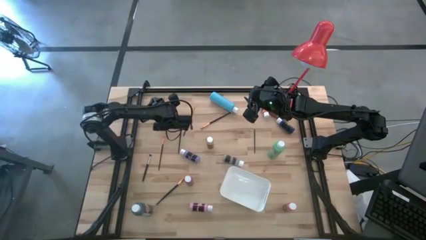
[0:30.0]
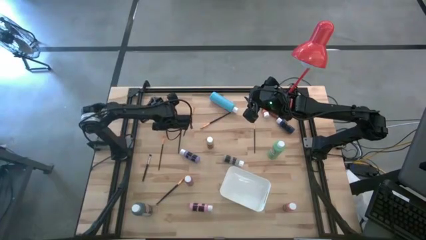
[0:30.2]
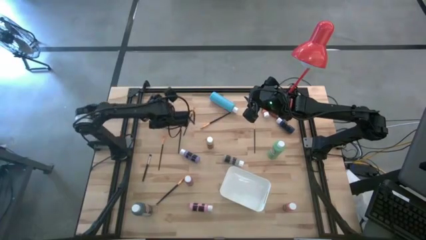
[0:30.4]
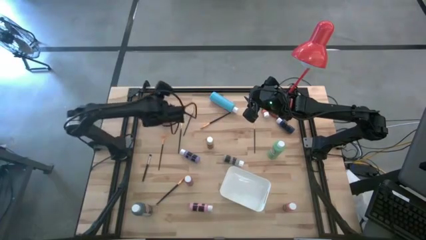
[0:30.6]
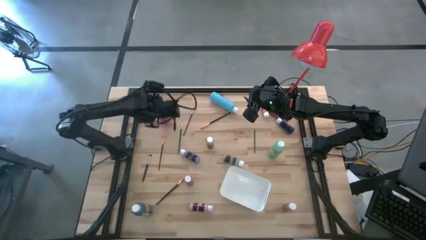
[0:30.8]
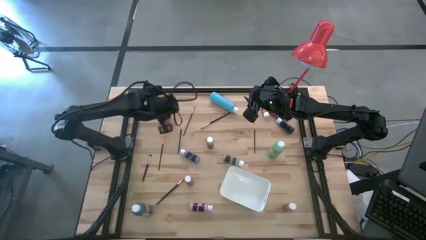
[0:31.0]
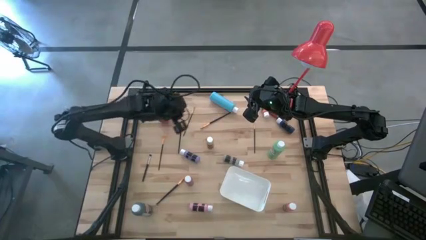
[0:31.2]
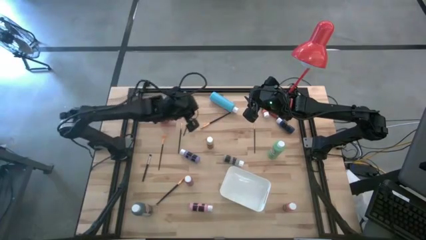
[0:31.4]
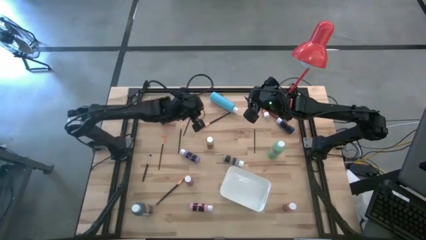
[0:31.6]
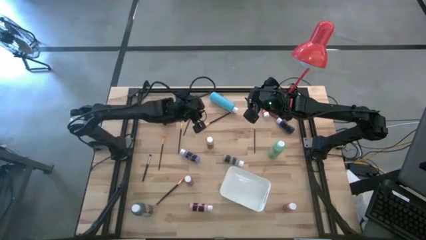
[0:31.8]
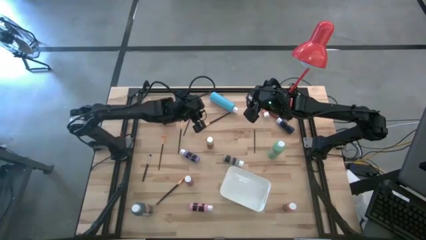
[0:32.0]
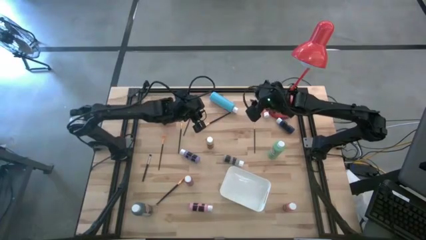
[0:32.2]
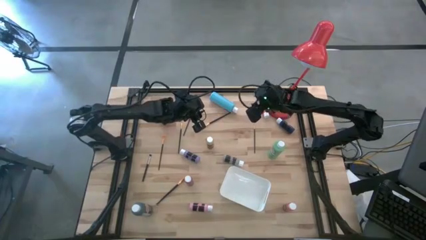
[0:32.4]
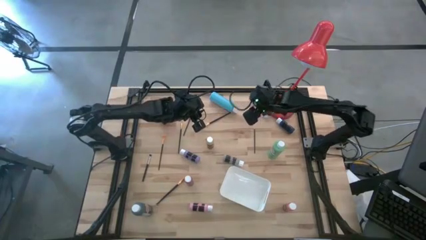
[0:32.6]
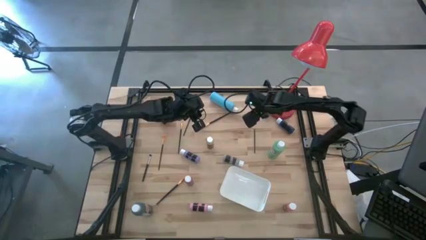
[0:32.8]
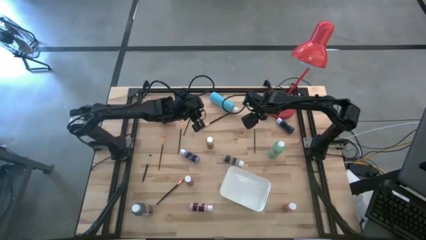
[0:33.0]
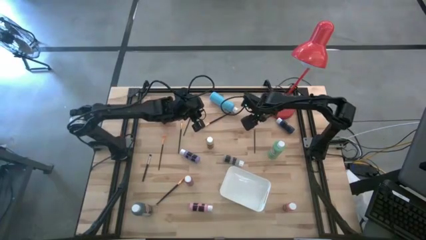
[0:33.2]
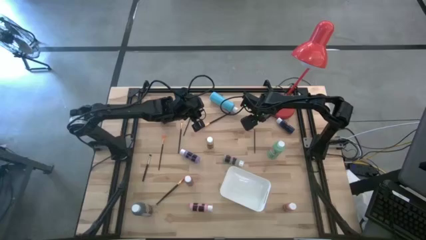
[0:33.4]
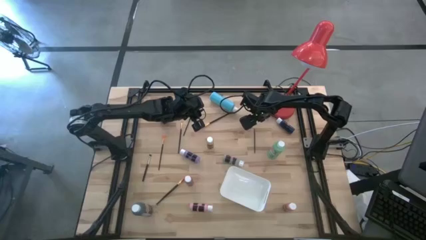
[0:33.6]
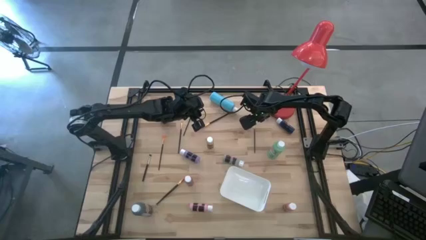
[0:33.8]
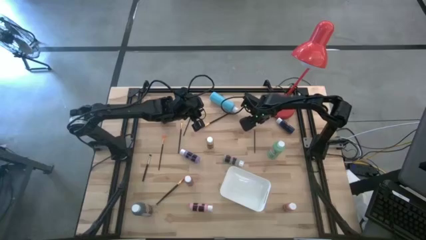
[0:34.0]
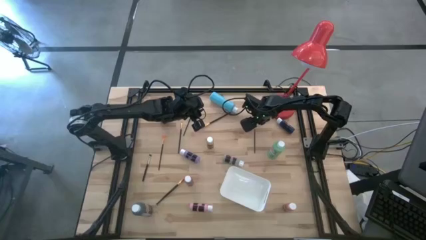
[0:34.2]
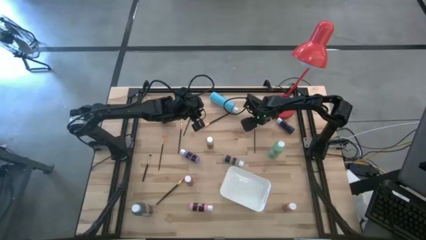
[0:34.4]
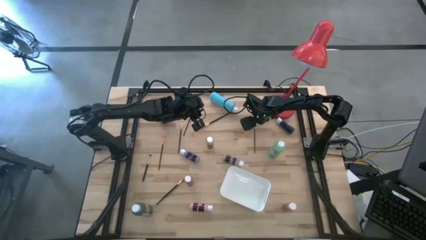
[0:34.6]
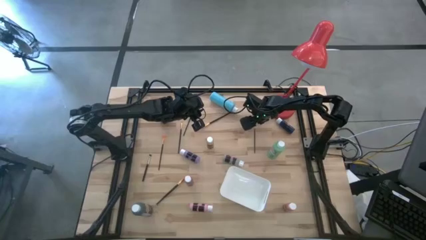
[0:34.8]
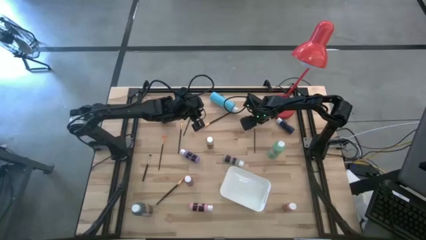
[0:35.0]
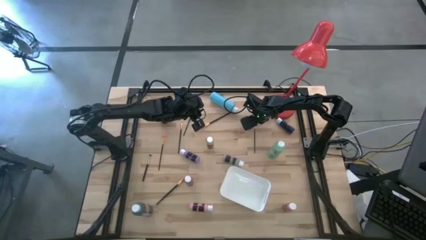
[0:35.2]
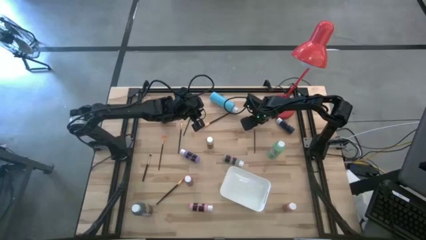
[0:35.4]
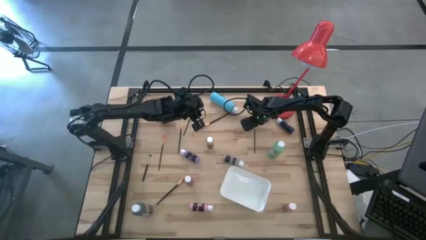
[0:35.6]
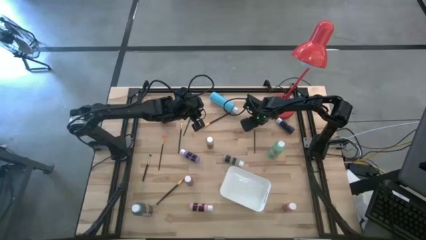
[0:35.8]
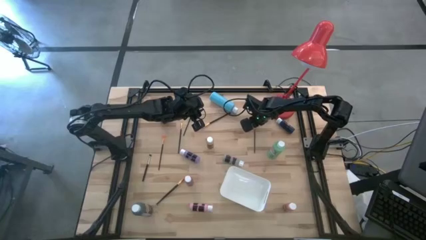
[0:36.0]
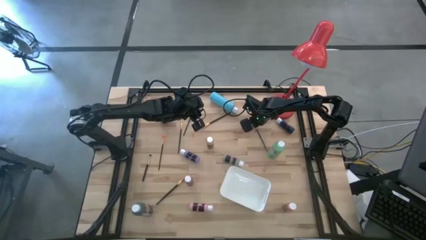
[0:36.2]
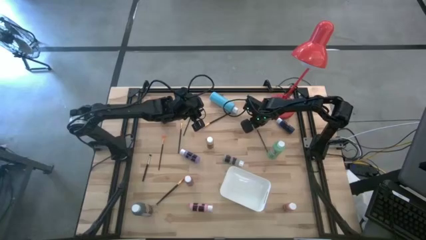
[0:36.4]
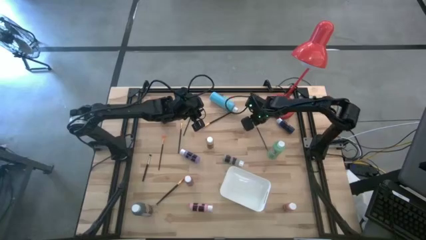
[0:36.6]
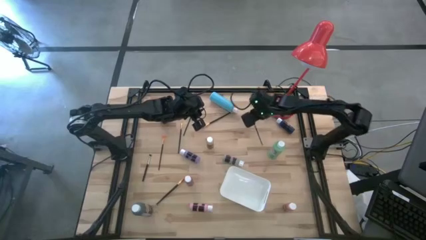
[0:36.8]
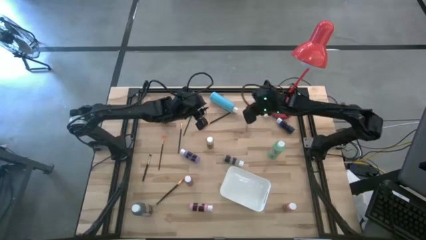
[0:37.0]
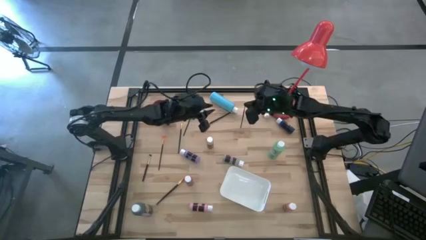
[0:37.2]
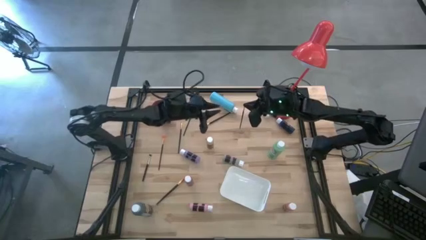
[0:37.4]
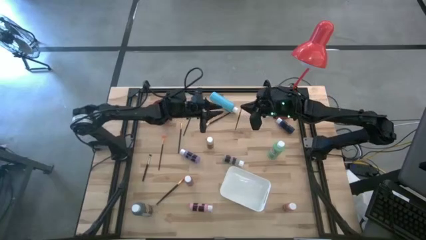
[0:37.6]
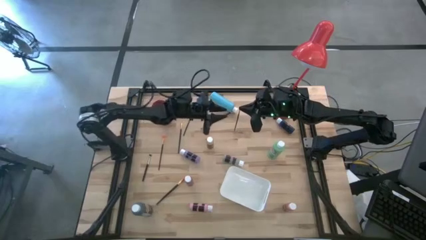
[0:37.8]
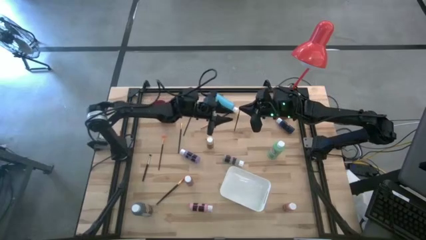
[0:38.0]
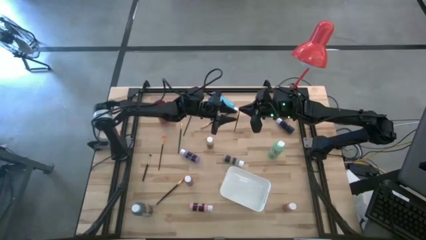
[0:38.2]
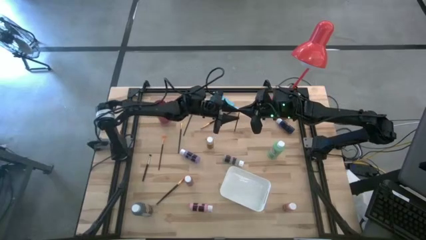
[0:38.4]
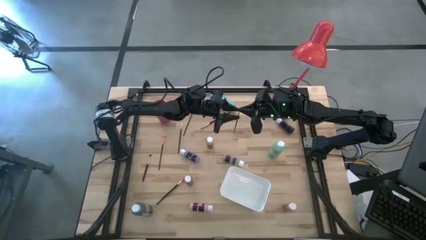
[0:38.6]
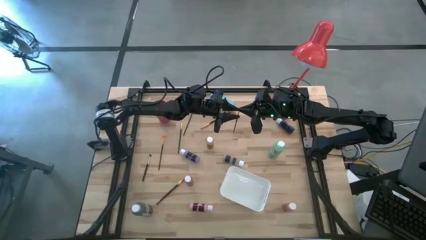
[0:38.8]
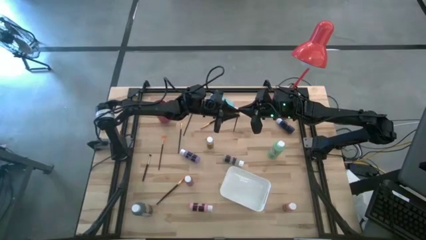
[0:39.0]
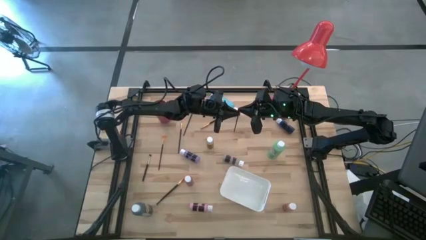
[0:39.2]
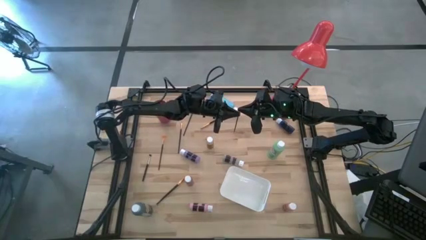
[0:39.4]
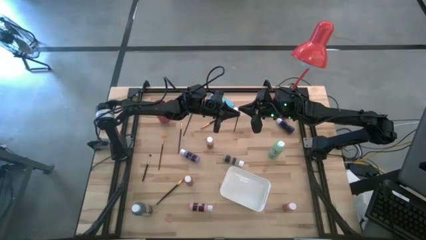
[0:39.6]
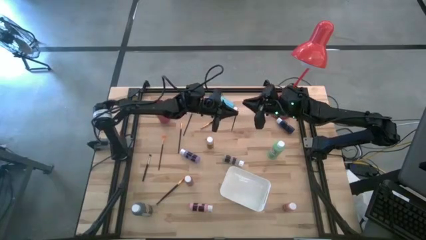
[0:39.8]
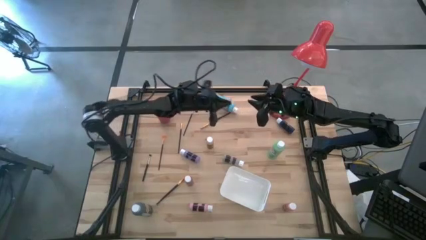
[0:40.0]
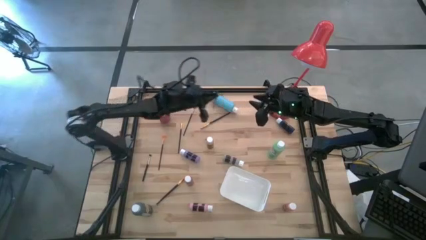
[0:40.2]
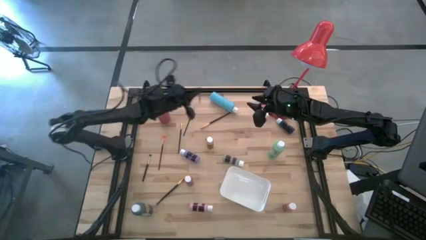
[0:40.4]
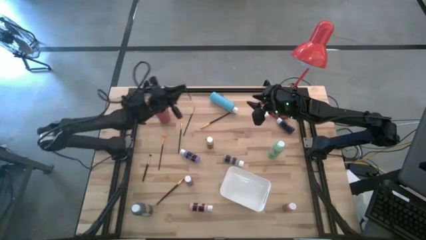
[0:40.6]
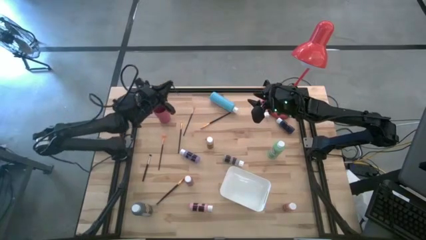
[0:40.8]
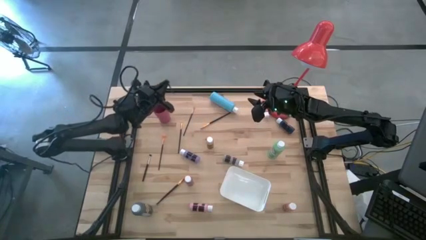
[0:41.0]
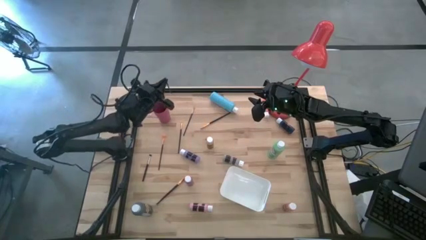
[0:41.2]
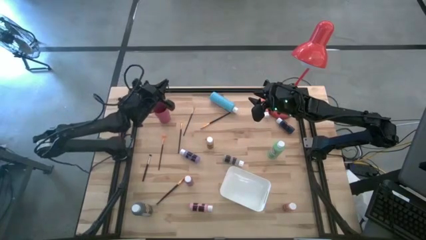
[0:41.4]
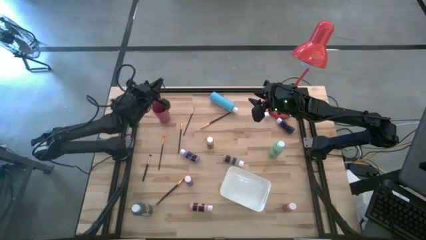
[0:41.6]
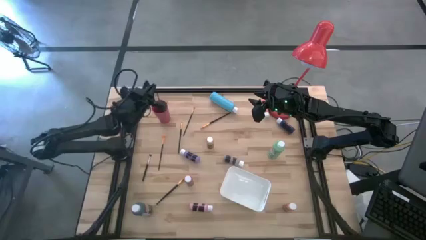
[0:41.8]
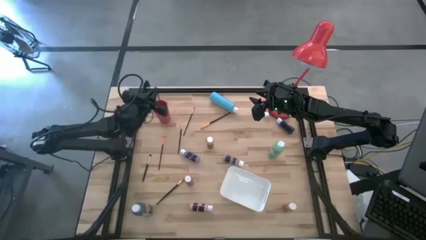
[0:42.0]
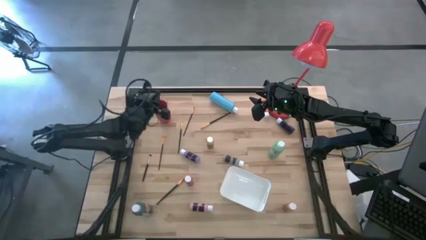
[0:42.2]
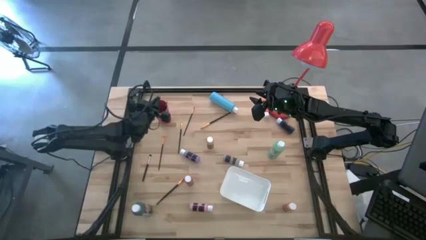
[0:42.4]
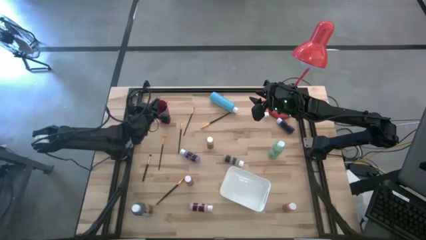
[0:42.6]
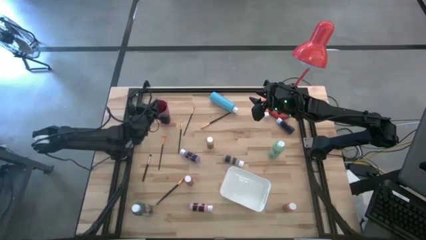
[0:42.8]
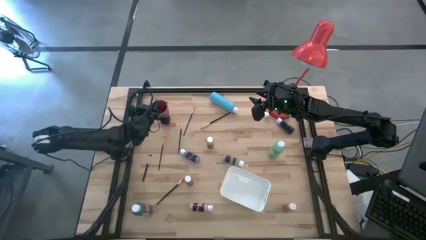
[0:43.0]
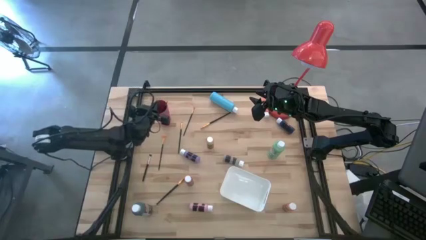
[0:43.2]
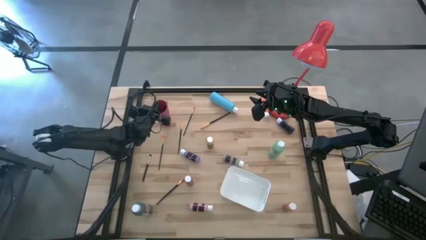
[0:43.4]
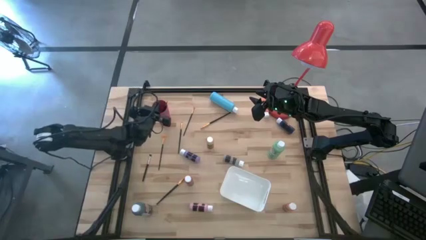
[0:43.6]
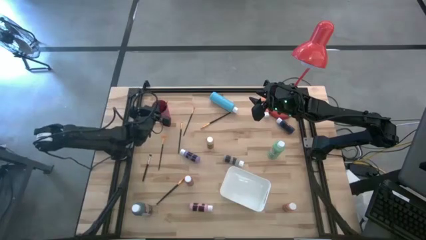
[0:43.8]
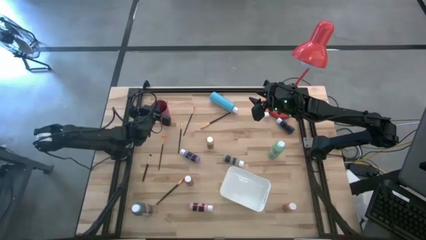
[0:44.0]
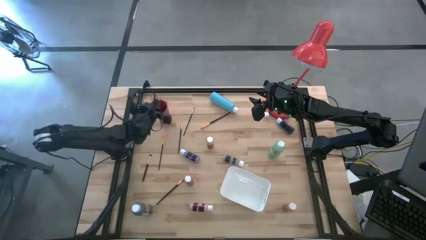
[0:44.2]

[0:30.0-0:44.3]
Task: Pick & Place Paint Supplies
Put the orange paintbrush into the pink cup
